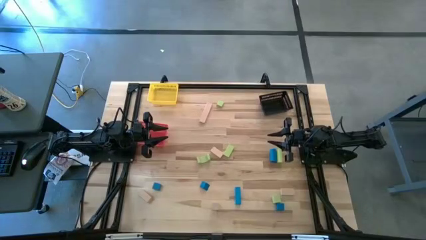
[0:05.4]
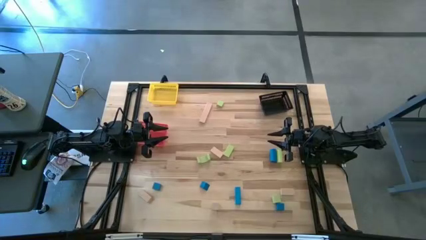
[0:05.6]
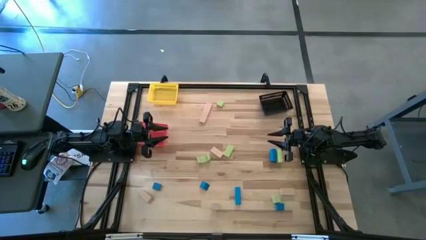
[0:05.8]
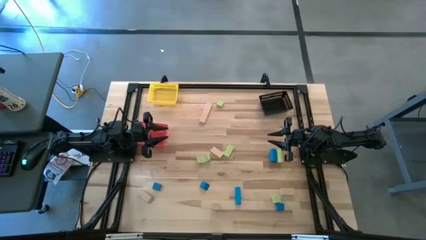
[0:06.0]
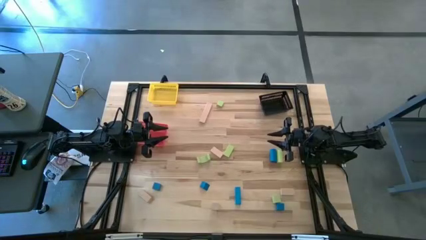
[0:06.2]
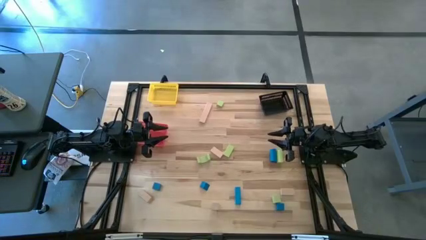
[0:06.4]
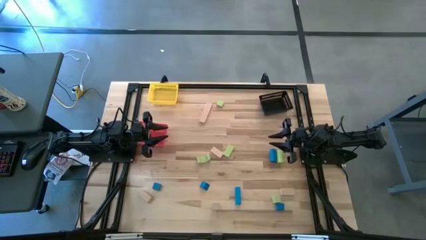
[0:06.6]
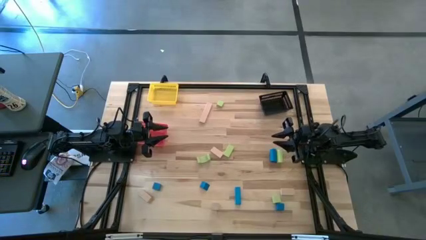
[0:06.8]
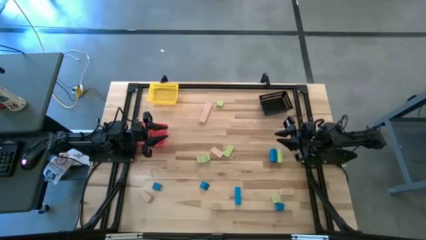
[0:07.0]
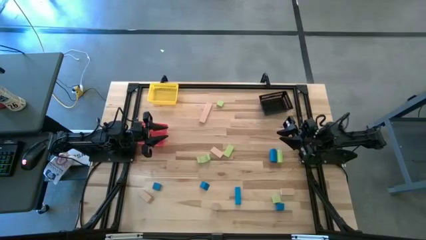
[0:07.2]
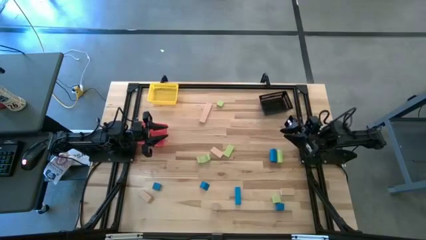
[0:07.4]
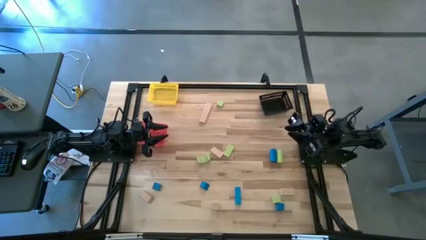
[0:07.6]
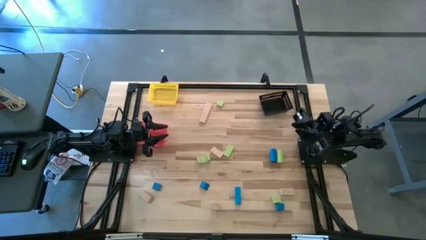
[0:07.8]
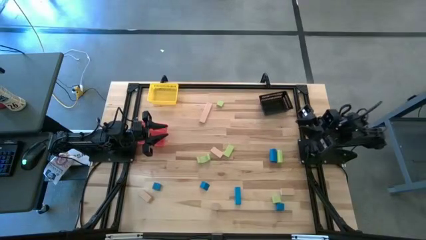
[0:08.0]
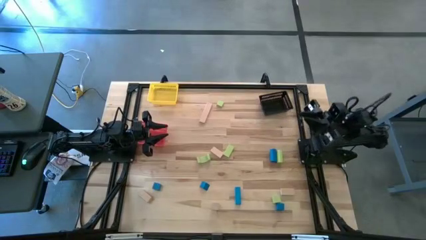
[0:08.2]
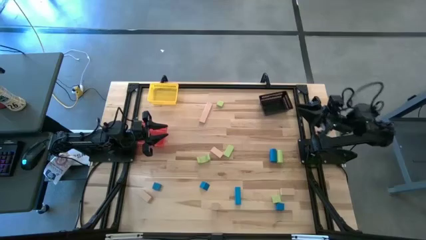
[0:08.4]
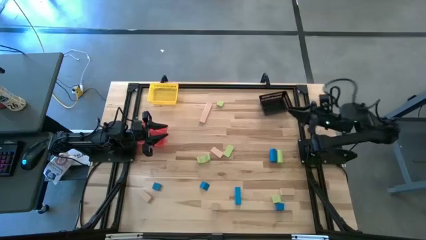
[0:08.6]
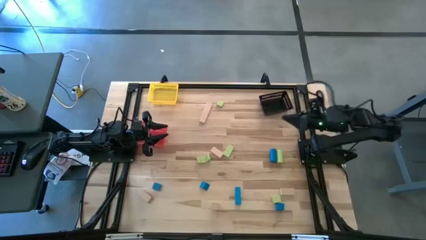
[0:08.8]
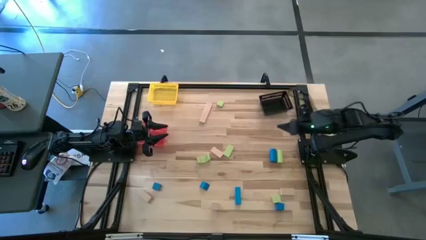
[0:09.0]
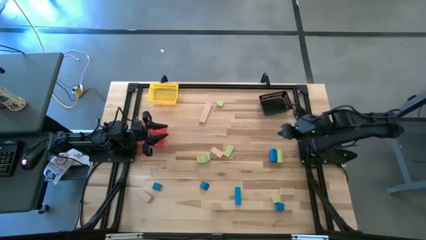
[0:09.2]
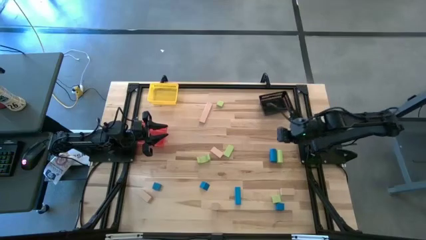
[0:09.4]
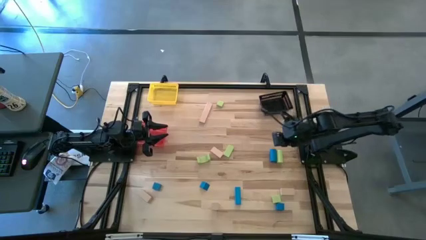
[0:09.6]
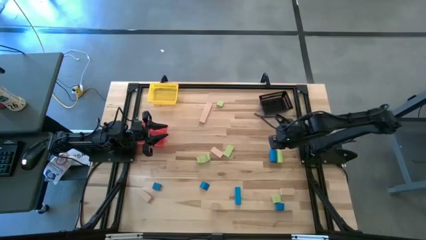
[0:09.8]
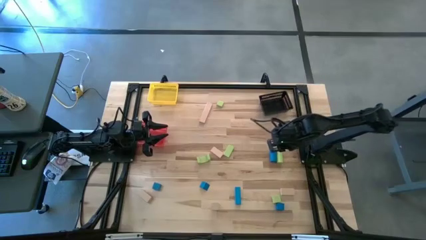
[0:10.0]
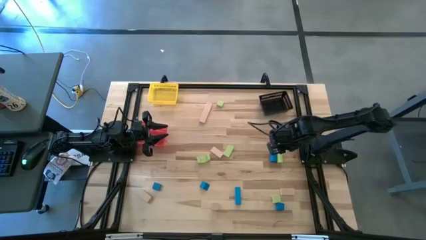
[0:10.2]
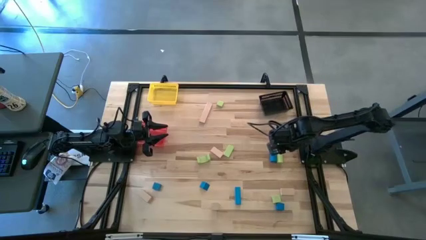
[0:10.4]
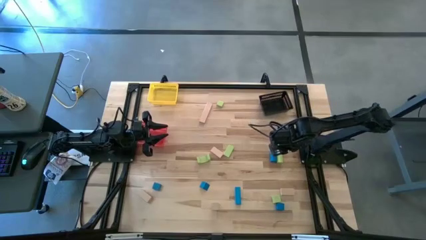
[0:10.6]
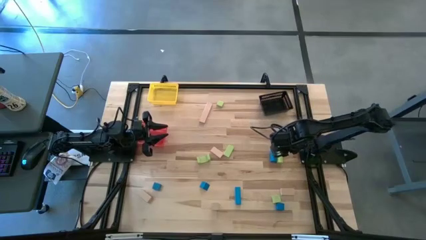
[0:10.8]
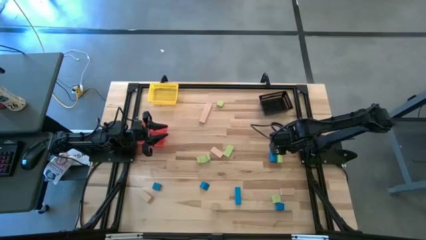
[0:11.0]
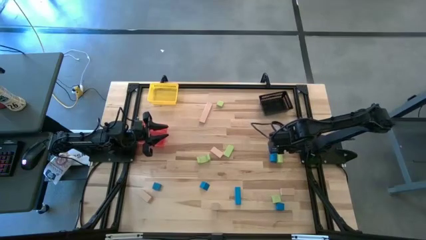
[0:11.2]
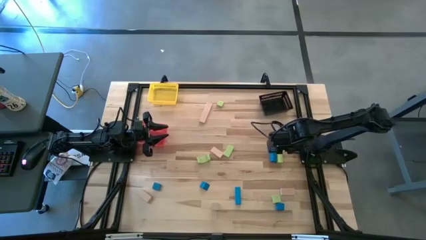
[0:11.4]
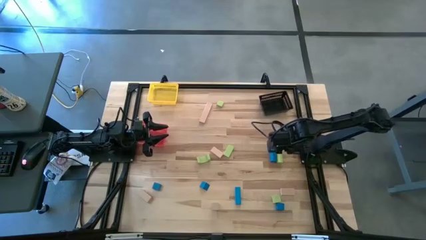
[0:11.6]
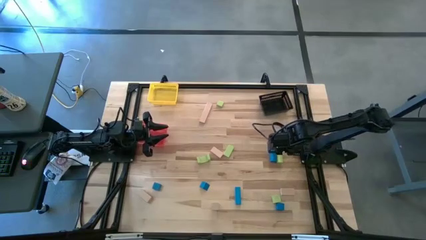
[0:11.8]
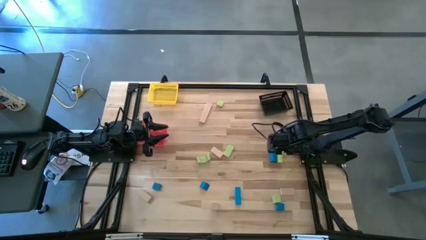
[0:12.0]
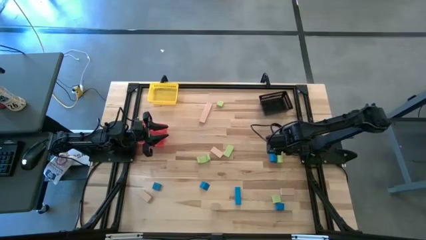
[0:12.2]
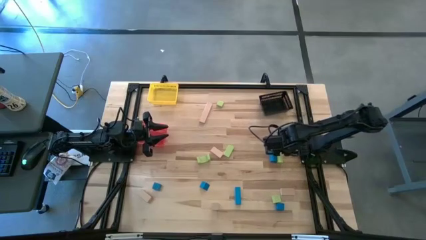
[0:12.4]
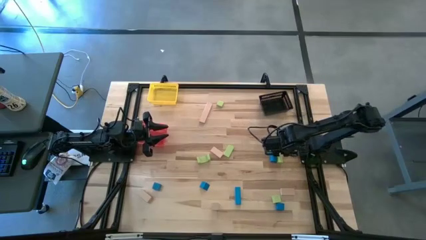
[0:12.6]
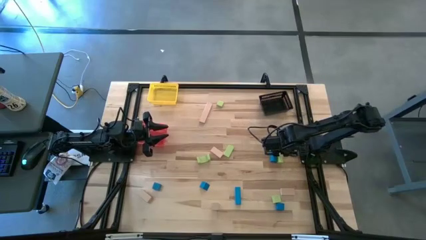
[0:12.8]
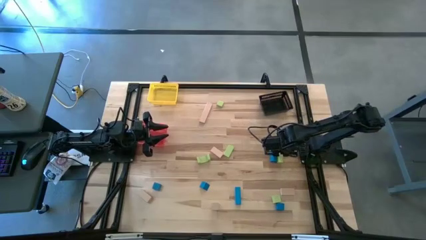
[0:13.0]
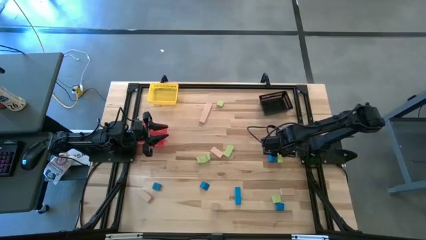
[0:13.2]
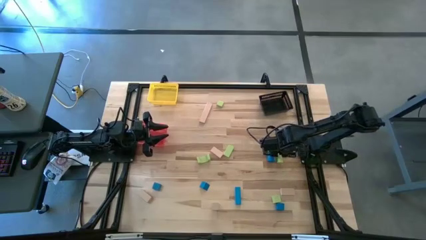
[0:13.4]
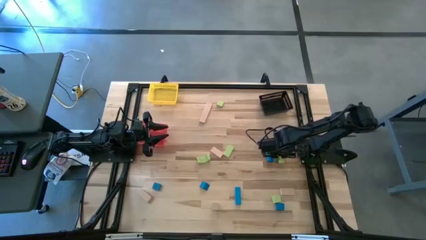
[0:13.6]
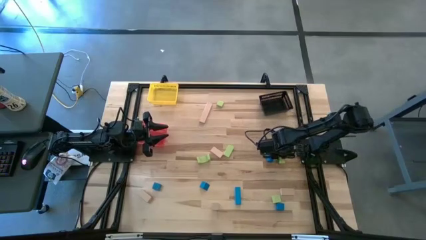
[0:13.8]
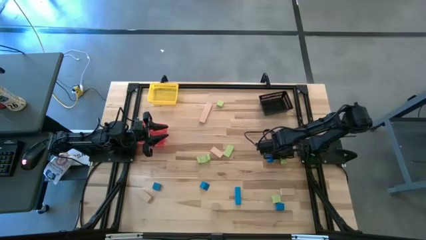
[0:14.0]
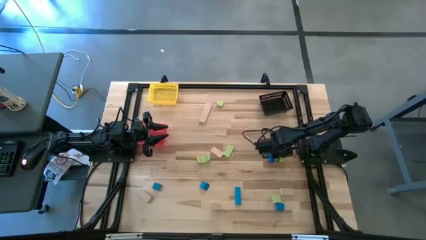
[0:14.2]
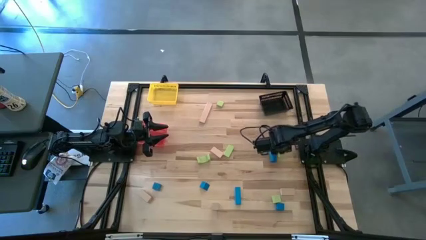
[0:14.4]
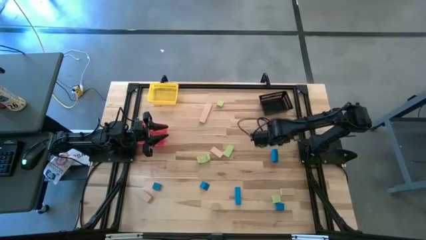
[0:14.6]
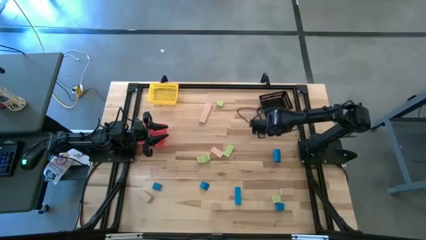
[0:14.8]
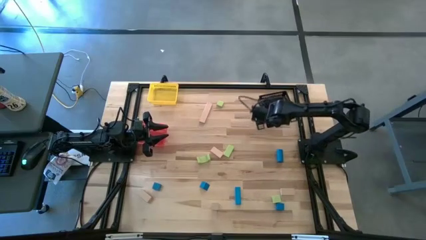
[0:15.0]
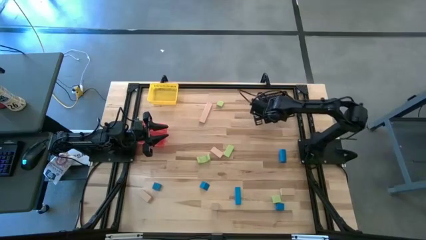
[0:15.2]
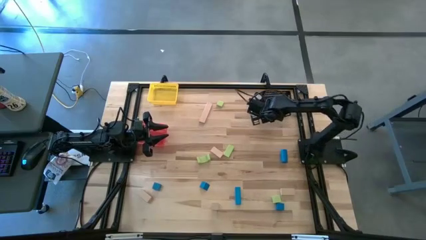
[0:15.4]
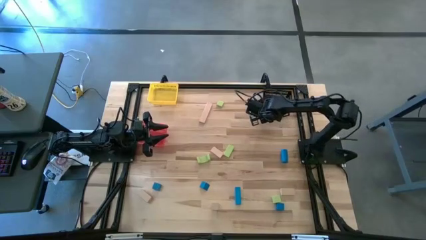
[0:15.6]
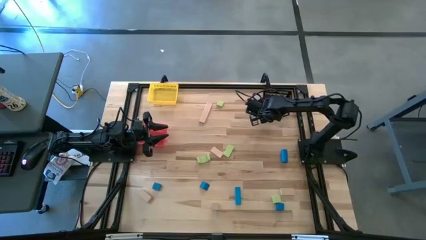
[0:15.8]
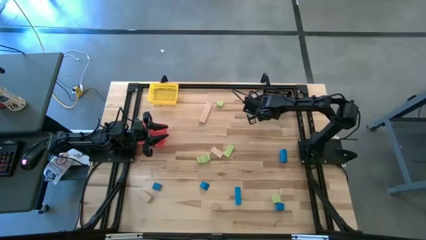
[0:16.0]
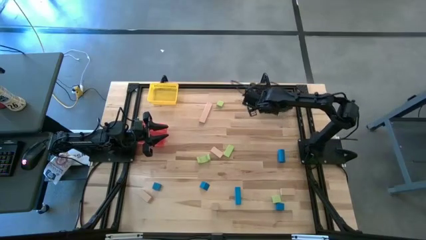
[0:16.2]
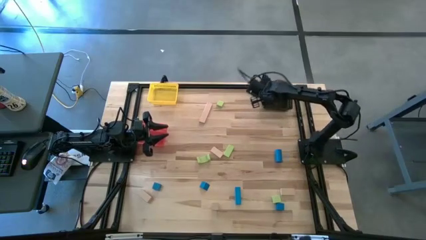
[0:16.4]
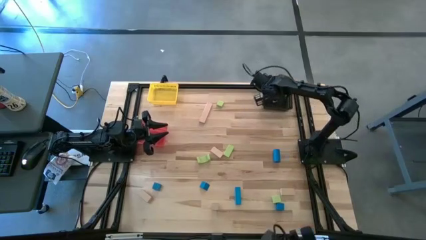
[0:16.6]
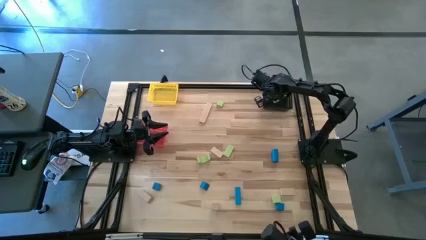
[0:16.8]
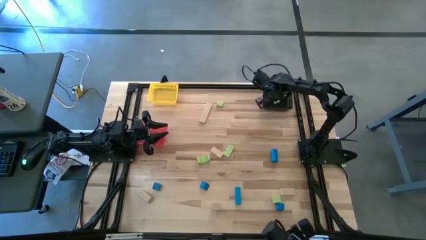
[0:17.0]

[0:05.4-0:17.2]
Task: Sort & place blocks by color
Put the green block into the black bin

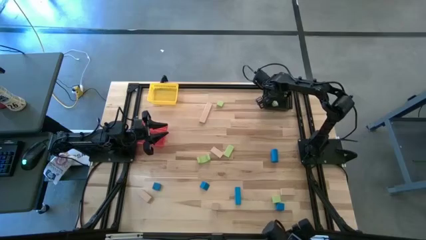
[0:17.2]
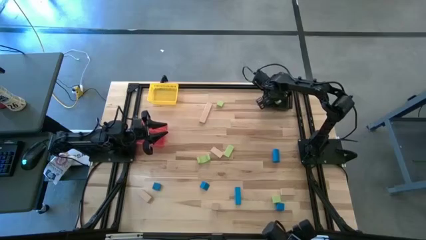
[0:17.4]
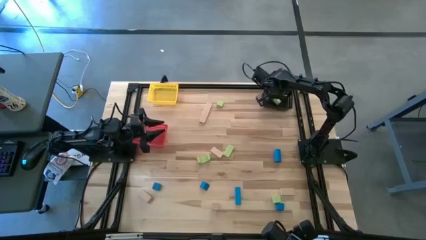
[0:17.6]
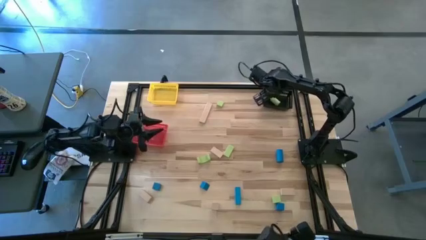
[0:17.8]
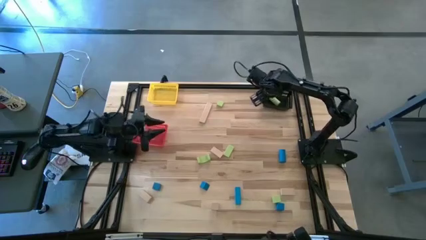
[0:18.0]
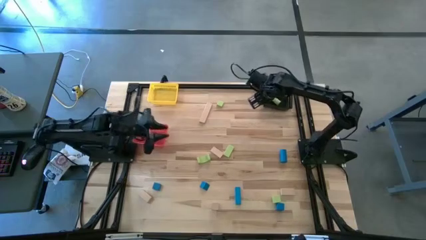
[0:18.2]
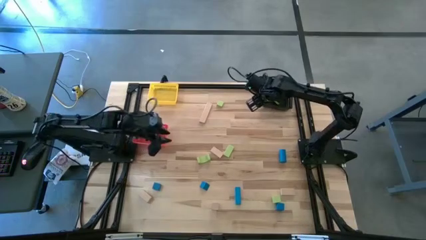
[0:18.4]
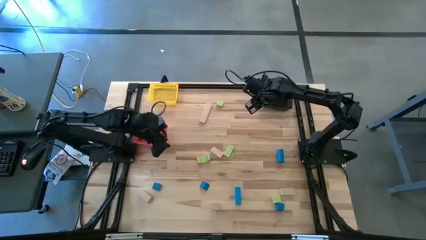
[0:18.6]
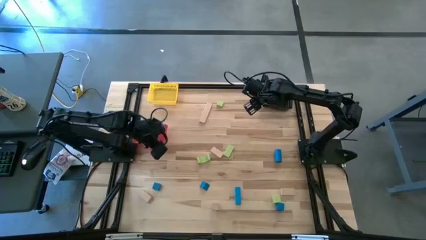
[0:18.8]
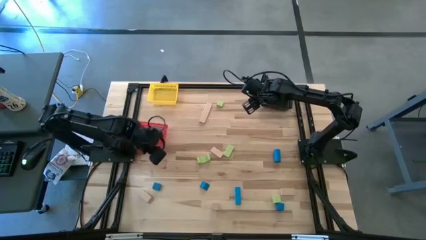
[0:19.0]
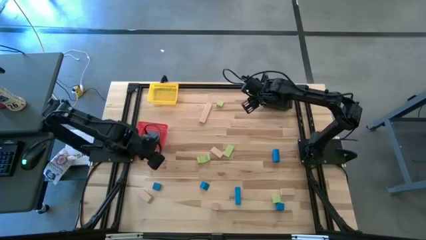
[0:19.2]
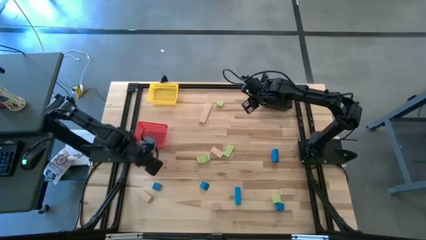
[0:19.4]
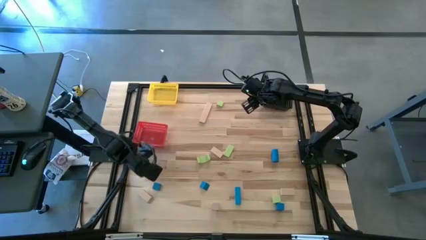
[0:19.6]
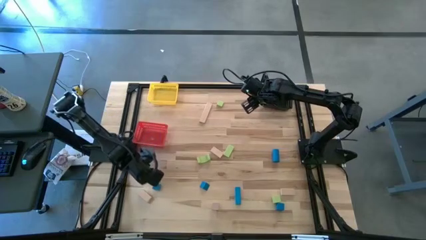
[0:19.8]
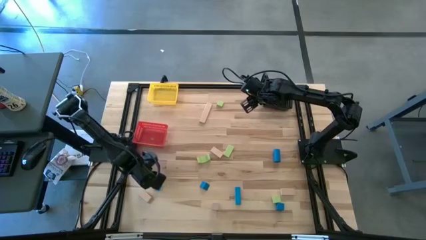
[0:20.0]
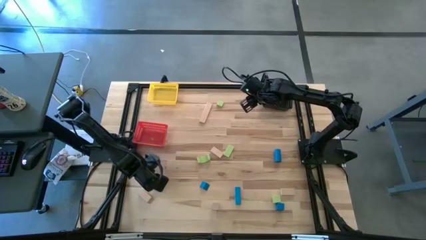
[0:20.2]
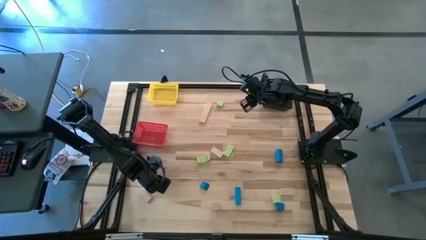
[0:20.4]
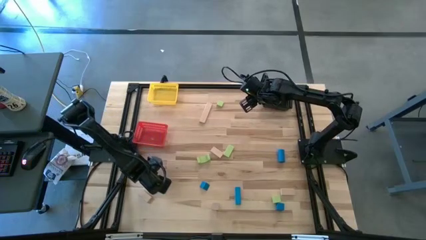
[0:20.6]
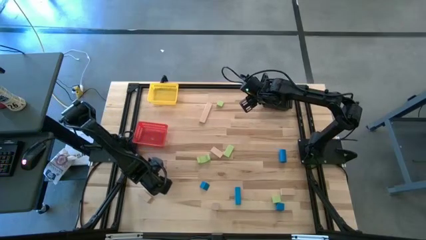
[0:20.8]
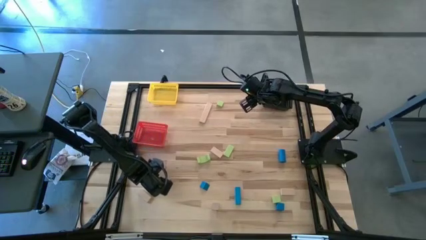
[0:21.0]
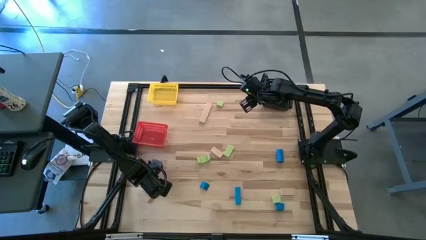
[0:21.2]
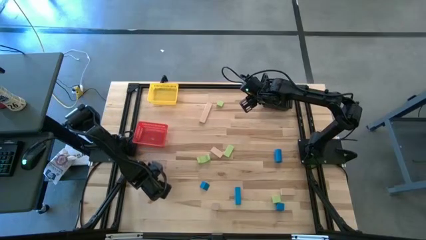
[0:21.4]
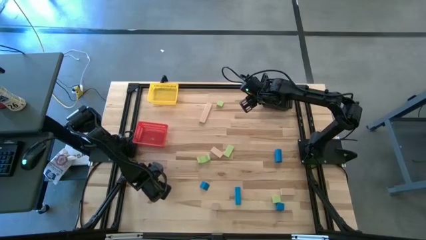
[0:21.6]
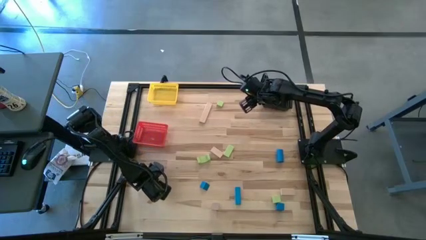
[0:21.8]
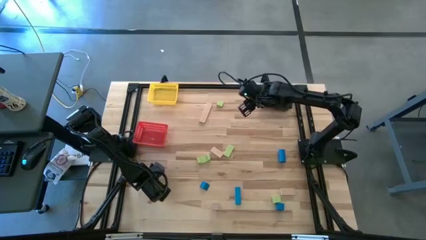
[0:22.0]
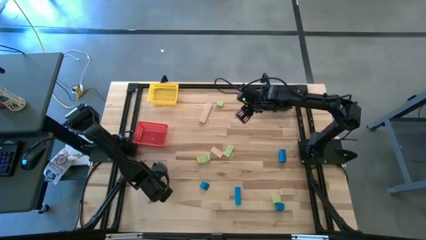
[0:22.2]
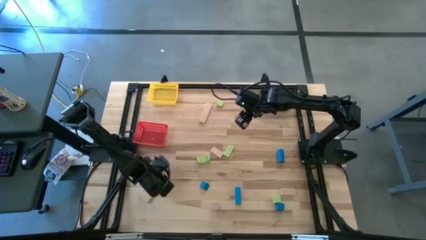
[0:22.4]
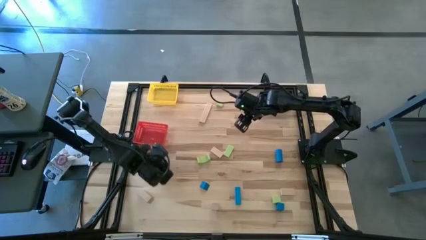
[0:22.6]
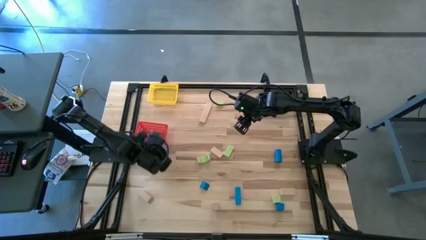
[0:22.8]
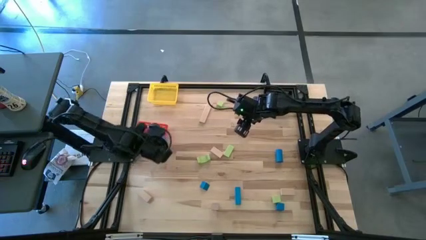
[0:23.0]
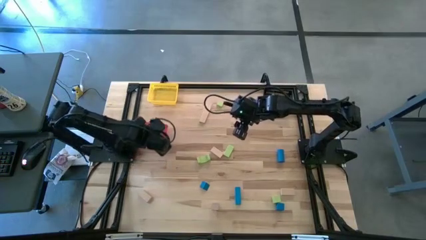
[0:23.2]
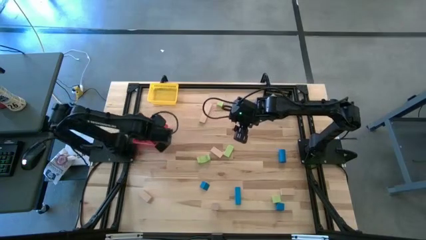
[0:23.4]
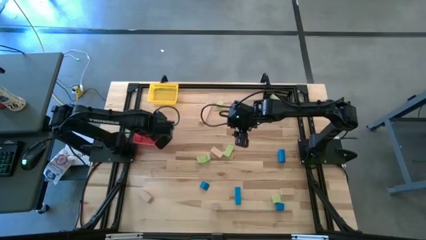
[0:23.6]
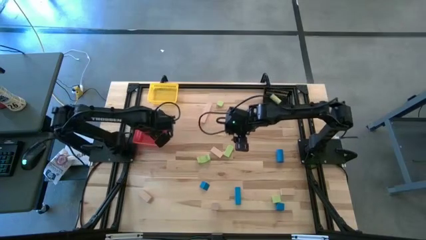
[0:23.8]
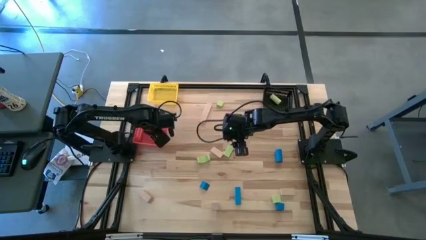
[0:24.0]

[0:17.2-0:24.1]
Put the blue block into the red bin
